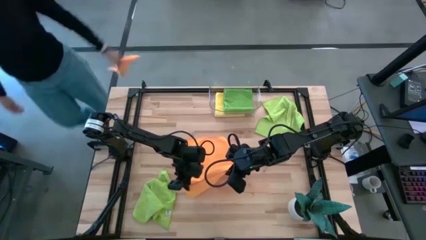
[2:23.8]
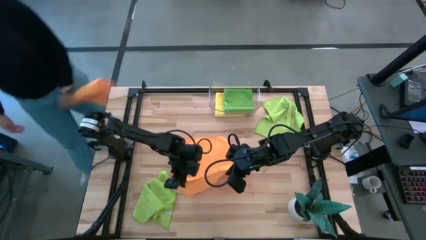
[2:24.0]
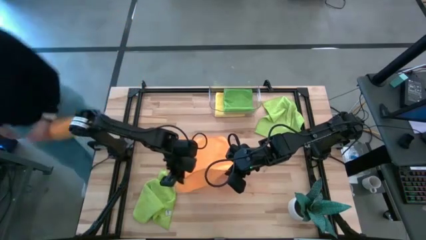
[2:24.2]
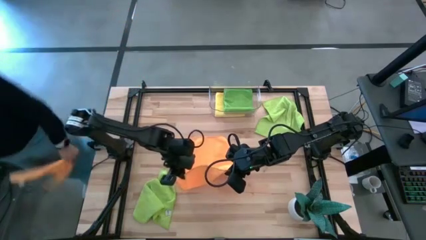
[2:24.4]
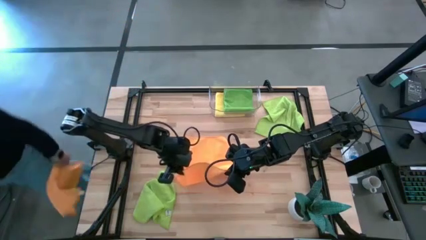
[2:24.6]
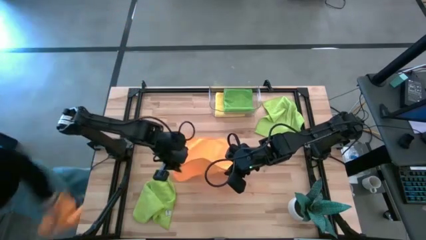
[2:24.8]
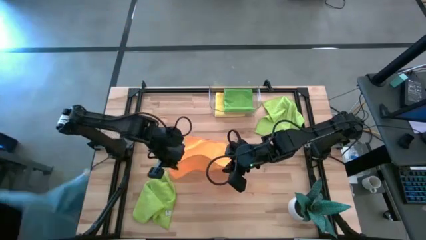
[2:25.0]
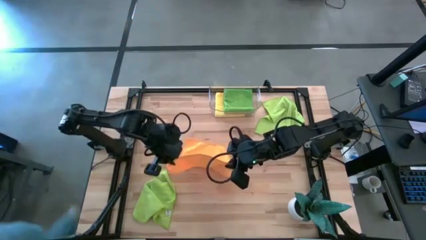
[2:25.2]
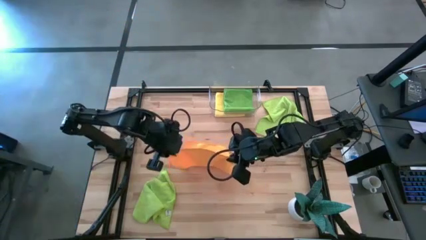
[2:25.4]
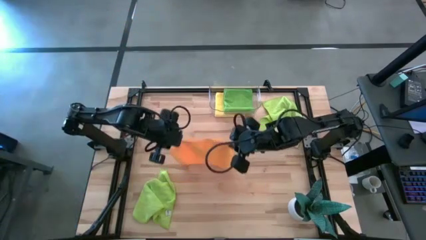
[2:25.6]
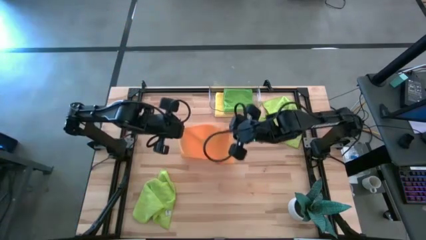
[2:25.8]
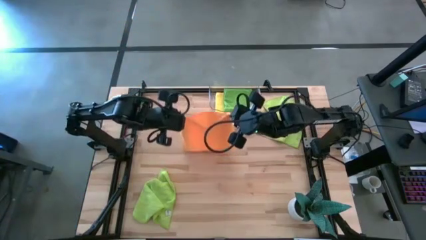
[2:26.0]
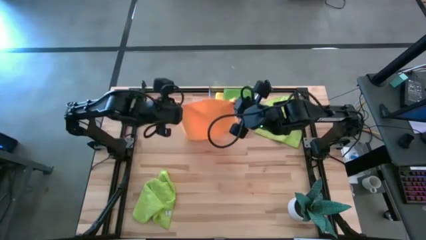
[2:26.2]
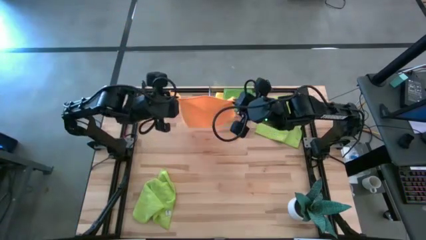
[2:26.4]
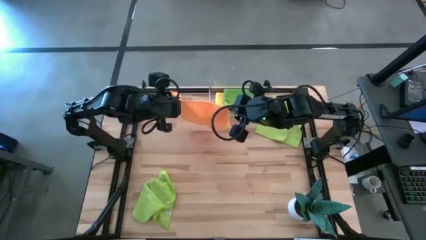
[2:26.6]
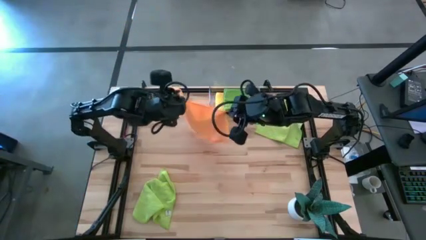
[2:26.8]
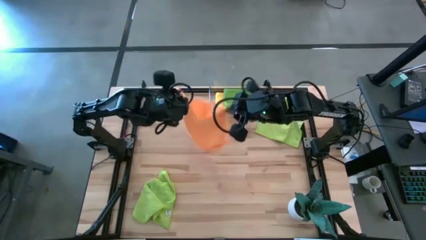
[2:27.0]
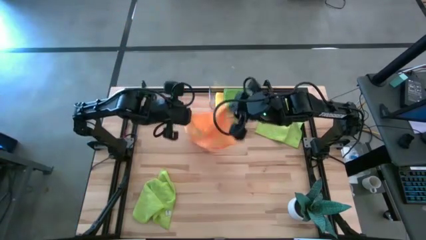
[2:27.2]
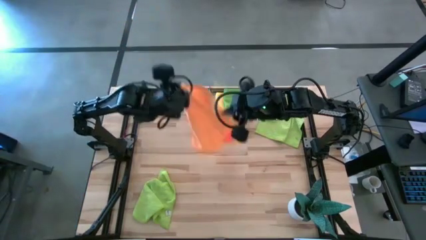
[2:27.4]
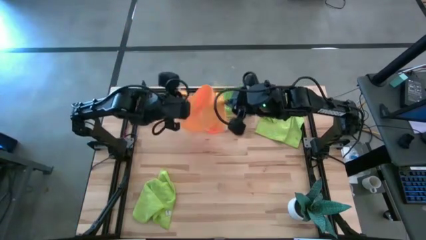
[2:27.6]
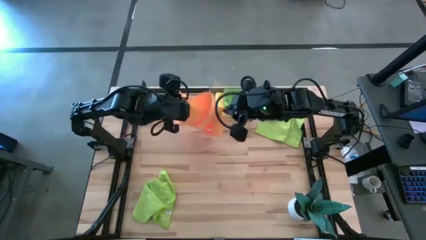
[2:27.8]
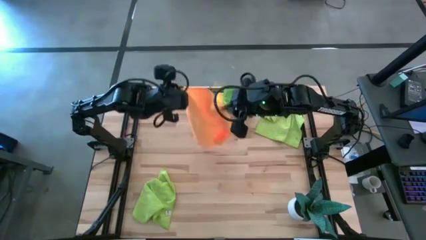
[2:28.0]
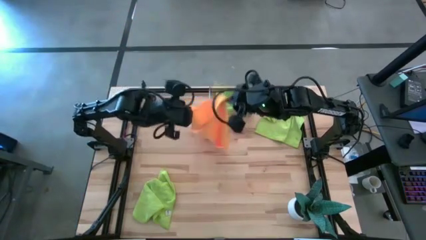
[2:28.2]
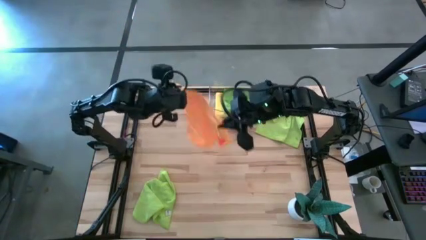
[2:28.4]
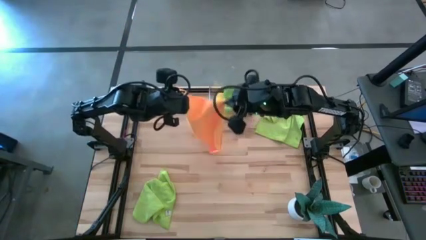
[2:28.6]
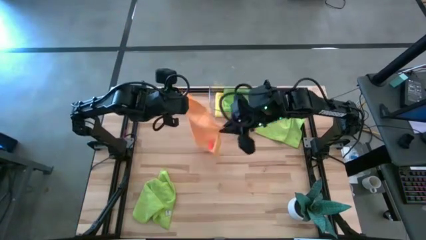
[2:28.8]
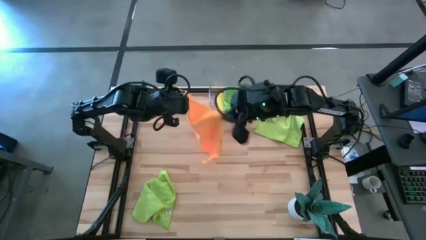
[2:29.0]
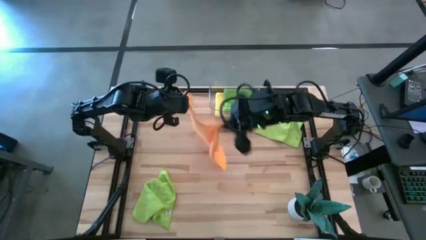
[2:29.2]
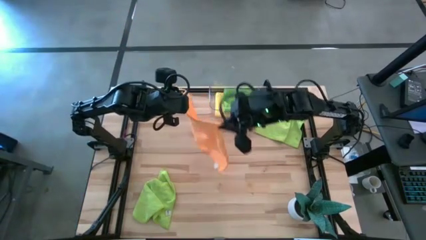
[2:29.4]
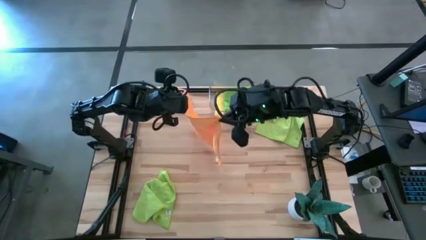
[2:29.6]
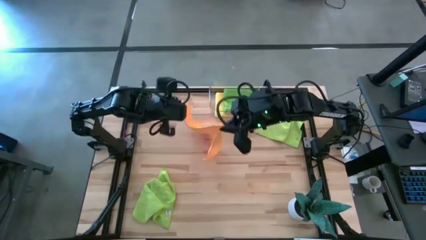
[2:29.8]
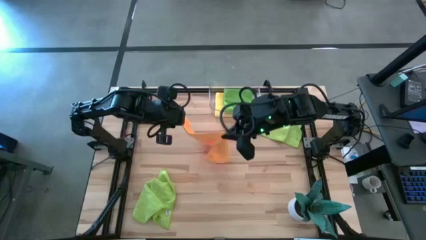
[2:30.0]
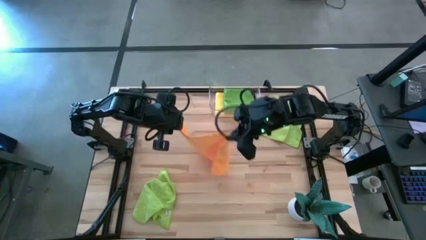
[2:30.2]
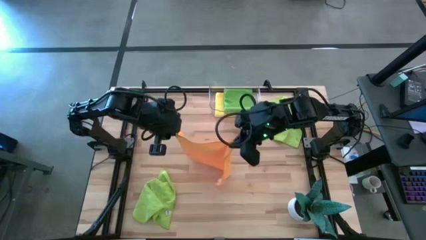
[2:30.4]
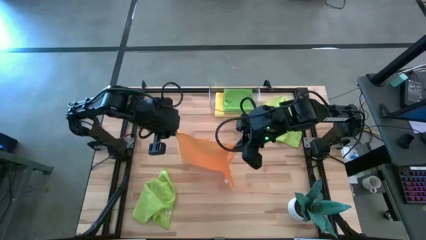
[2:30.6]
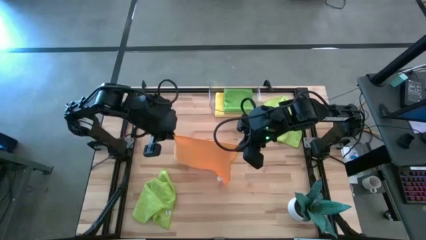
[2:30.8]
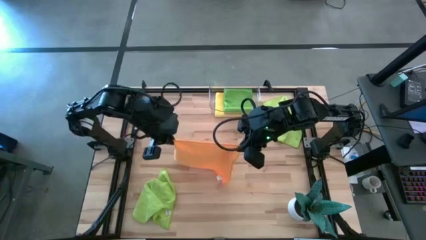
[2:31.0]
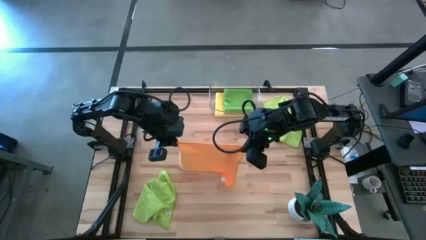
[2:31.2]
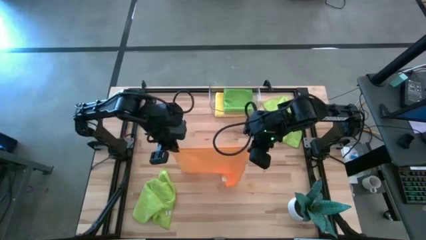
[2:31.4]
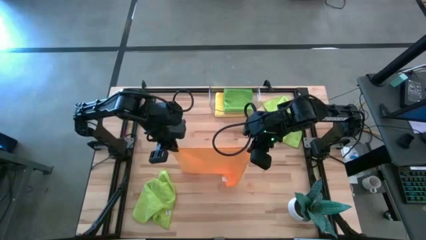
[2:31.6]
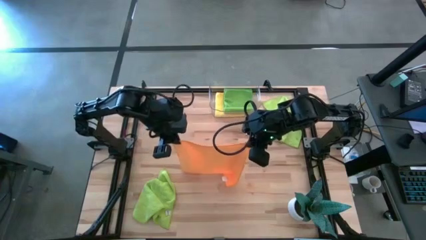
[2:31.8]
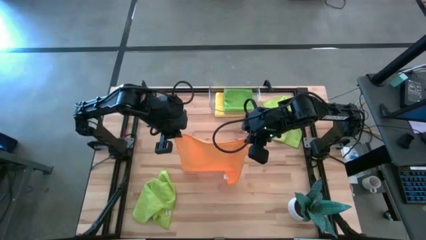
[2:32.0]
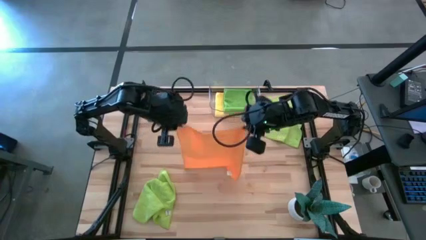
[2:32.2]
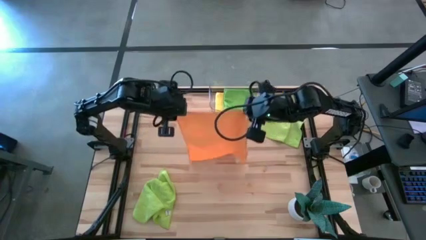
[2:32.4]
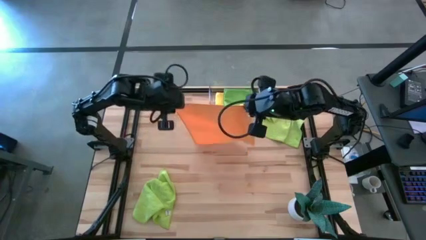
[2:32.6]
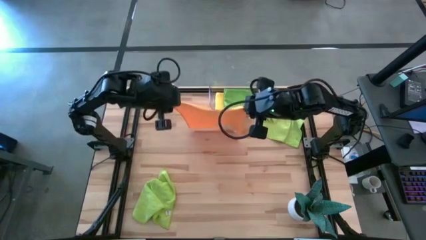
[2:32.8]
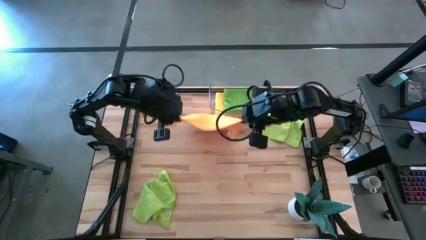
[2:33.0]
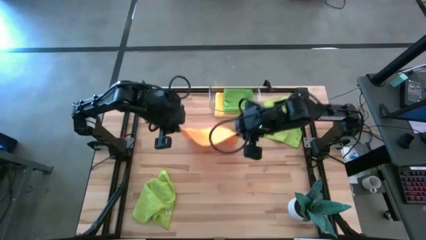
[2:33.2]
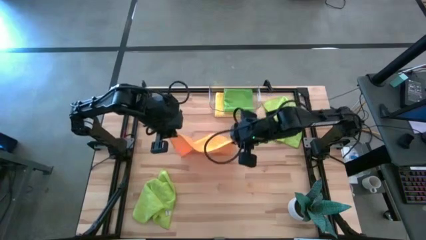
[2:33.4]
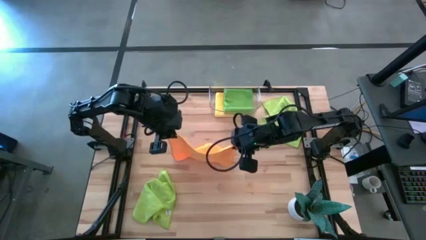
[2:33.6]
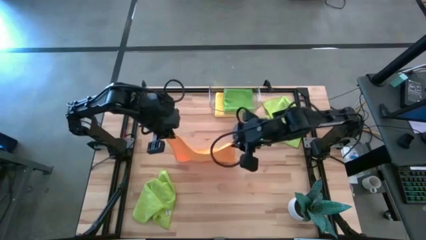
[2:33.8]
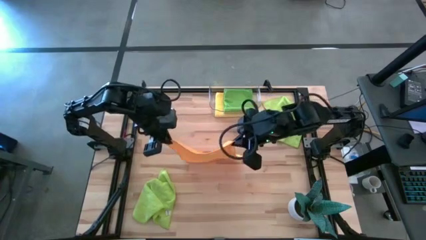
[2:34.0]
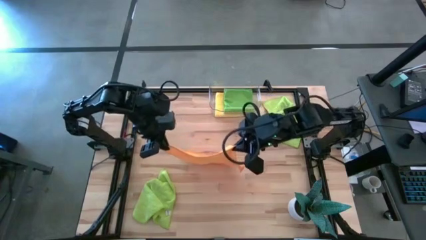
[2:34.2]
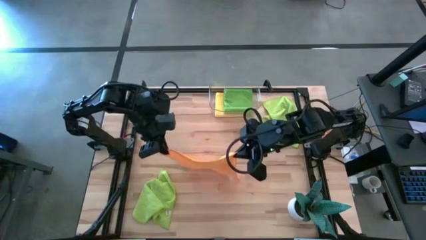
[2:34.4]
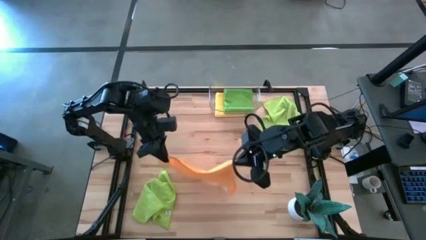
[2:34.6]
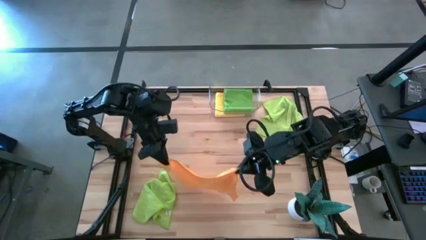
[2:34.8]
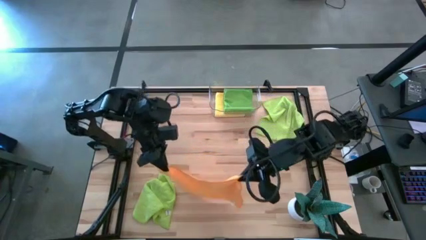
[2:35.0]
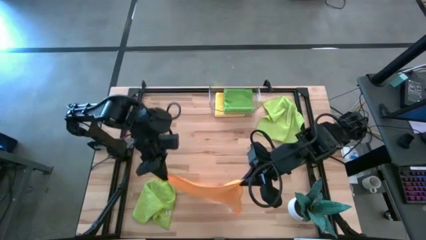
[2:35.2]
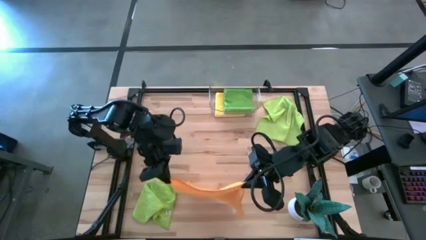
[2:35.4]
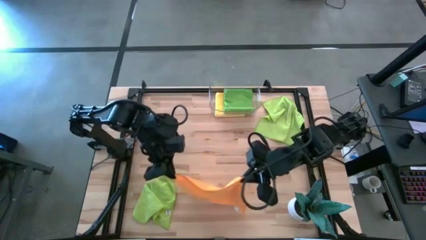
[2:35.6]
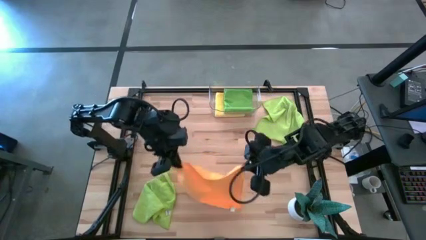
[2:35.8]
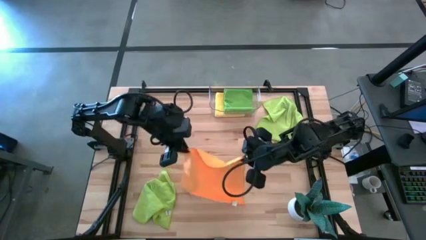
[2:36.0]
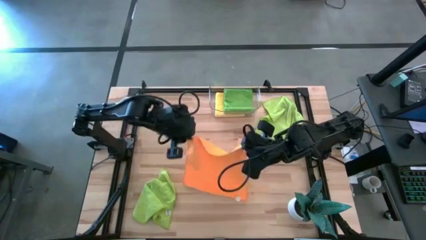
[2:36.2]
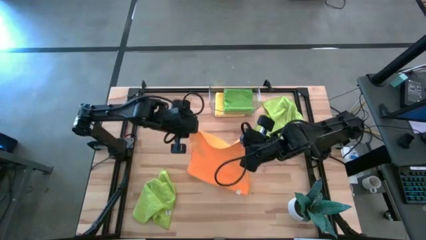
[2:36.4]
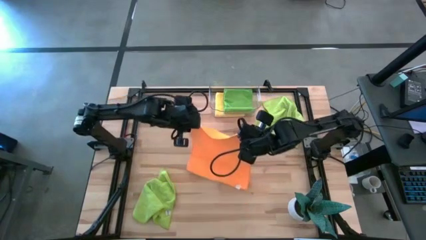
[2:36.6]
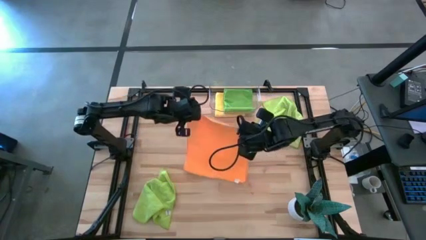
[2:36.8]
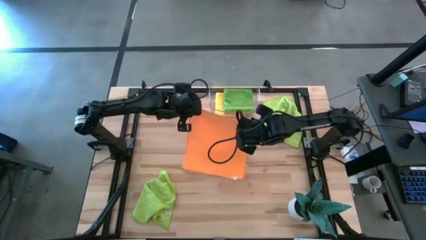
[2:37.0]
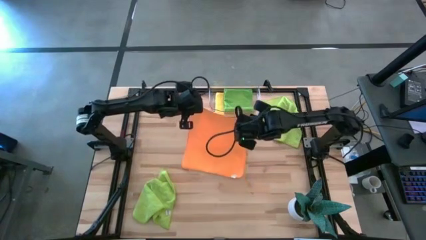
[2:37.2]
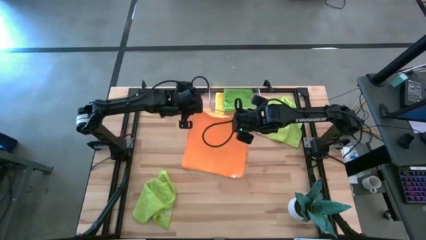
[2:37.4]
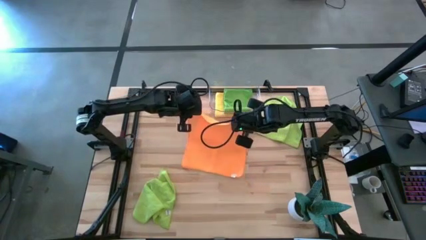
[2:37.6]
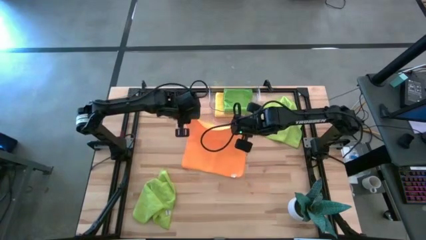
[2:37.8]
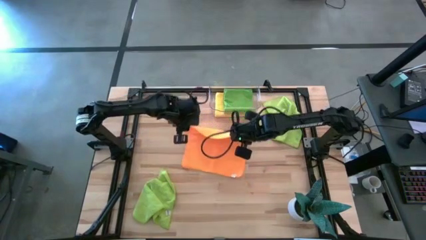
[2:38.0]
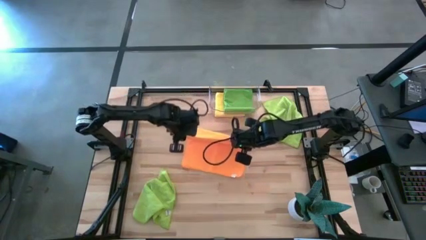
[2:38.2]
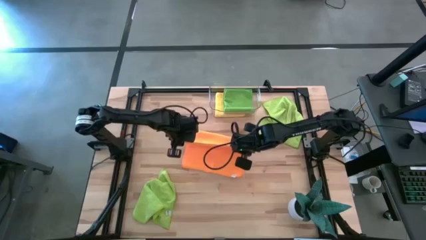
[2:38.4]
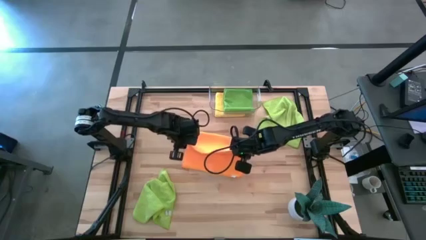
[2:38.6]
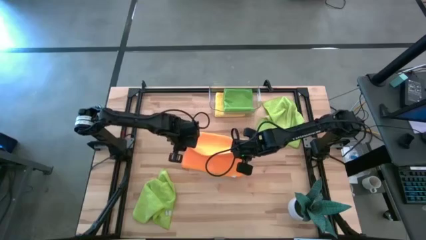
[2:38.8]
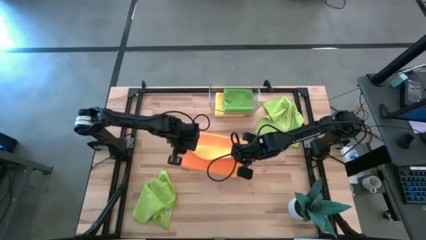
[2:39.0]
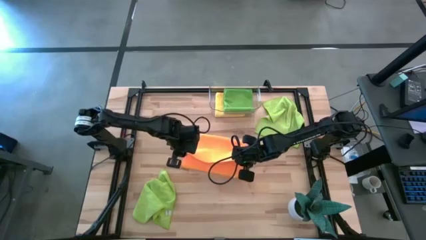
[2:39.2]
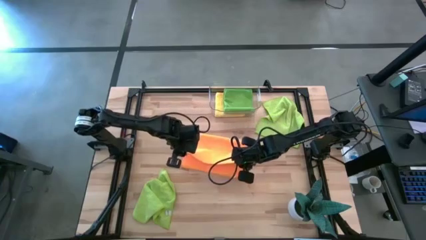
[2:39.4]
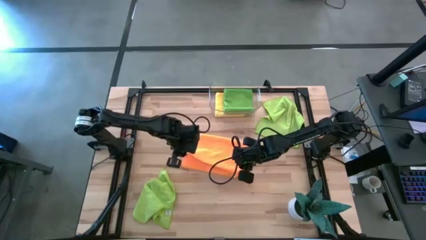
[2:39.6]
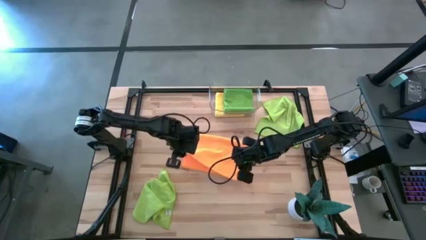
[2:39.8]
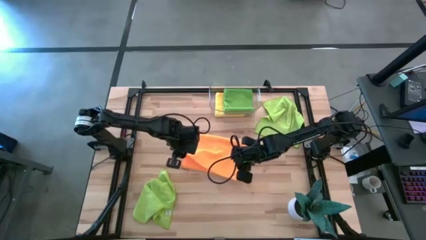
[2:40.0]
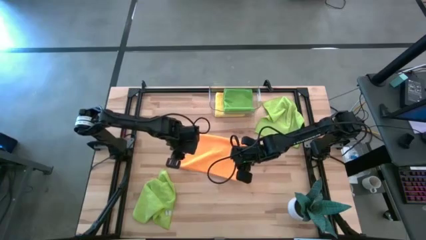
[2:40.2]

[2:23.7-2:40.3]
Task: Fold microfiber towels
Fold the orange microfiber cloth
